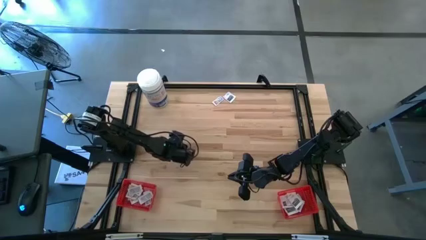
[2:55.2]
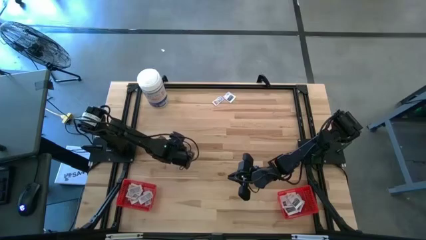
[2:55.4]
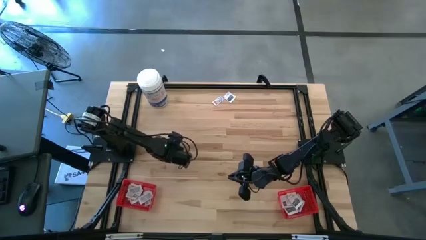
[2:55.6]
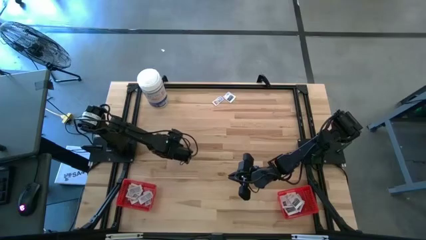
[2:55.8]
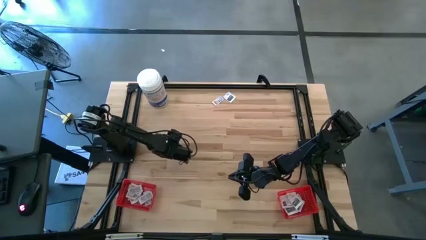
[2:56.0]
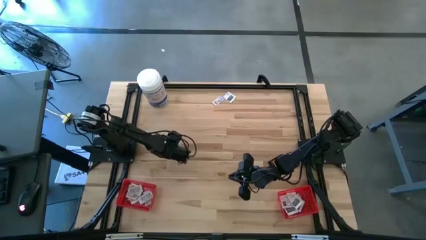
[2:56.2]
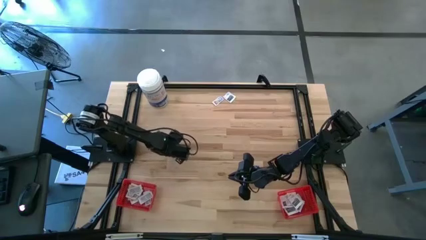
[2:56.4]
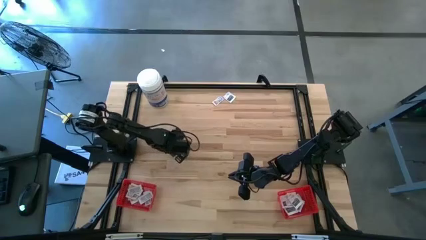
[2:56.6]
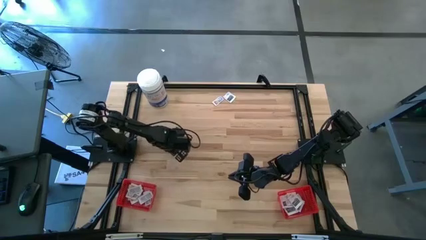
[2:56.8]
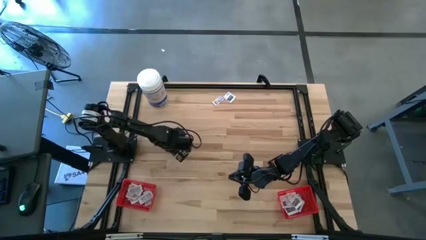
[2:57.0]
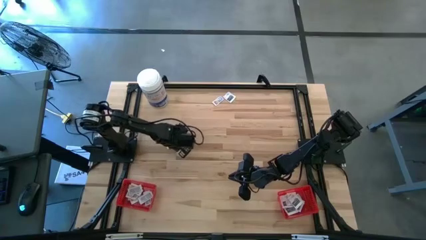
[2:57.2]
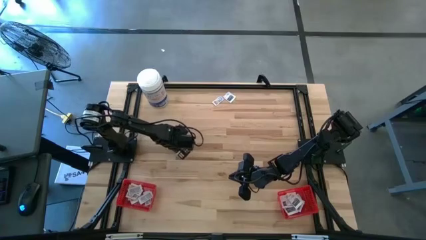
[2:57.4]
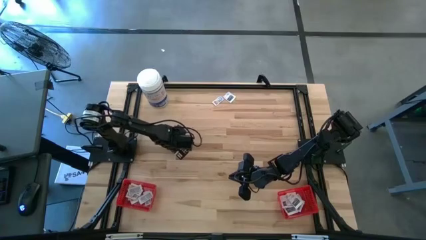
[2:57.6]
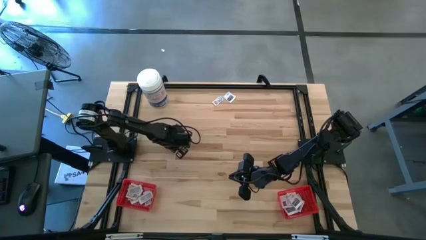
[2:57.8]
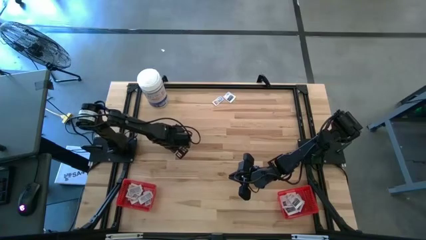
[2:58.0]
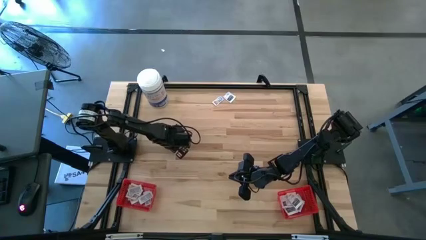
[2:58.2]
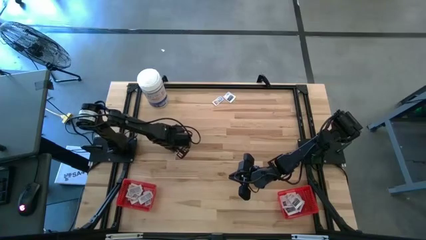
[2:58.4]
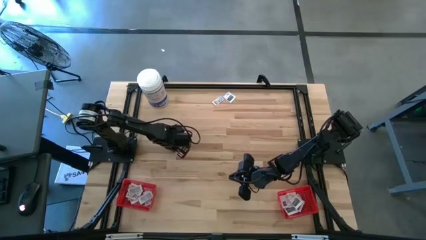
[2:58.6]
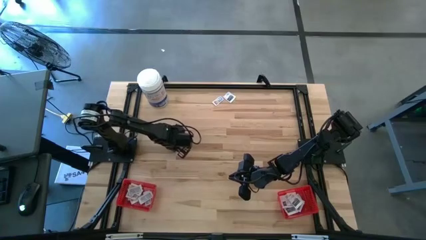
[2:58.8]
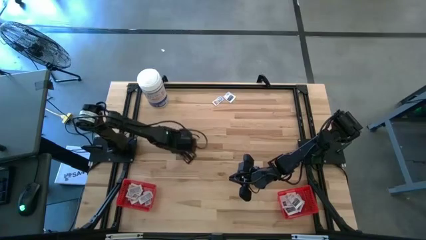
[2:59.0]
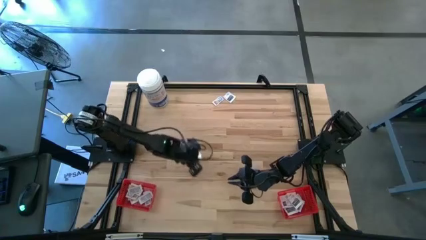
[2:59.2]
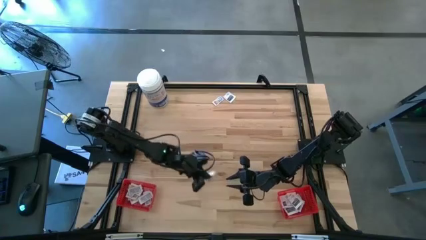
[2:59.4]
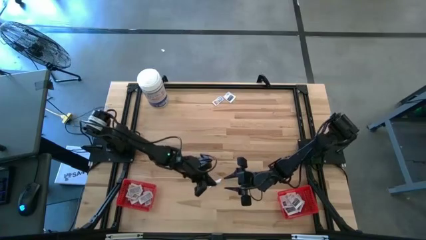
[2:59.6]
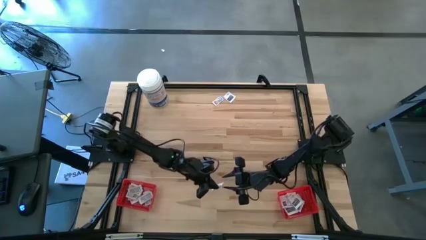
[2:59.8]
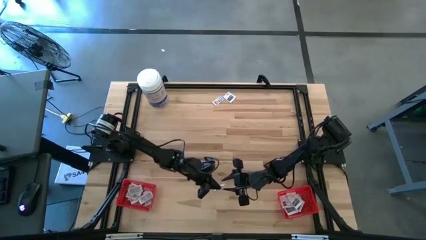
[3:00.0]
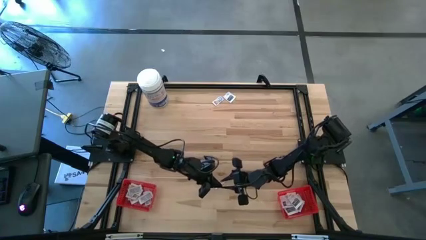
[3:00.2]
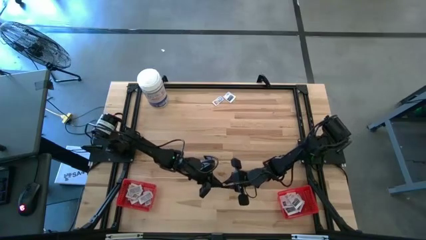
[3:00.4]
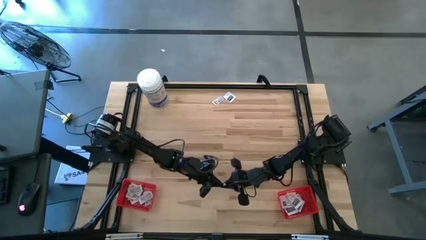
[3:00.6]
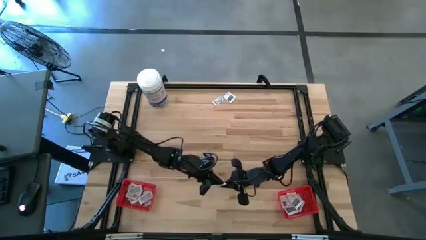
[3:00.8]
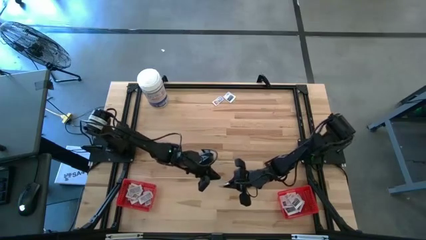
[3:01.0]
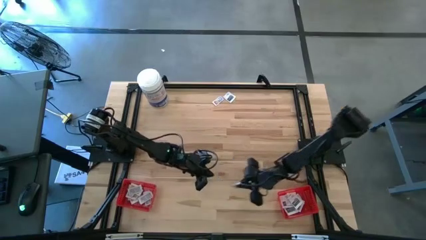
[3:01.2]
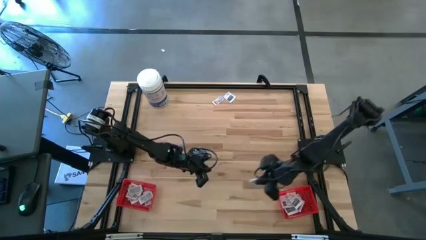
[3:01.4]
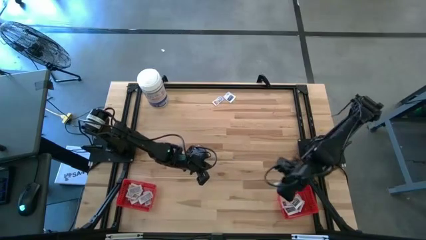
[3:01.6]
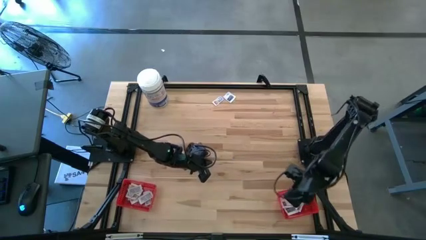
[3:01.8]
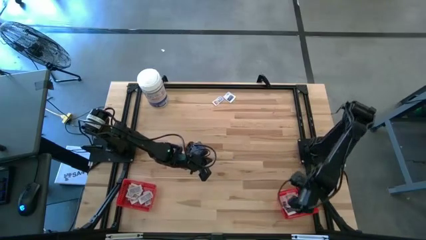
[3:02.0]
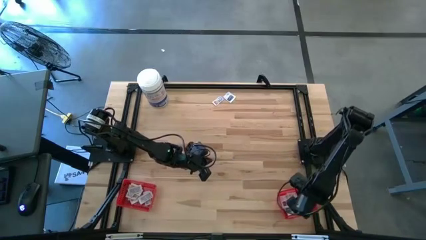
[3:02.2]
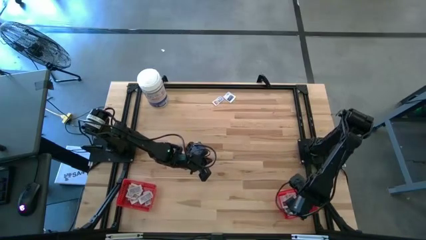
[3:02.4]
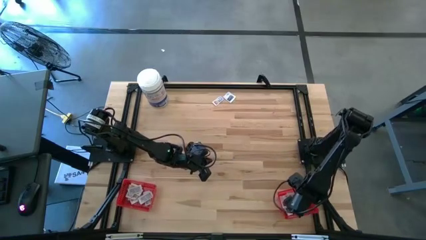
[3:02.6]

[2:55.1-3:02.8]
Task: Pick & Place First Aid Supplies
Put the towelette pack into the right red bin

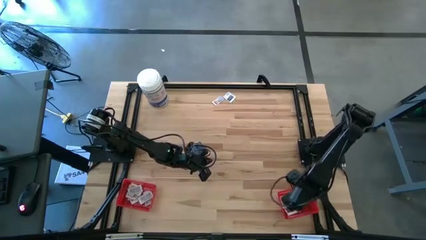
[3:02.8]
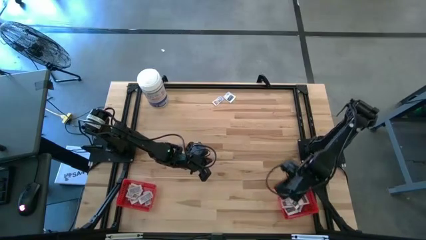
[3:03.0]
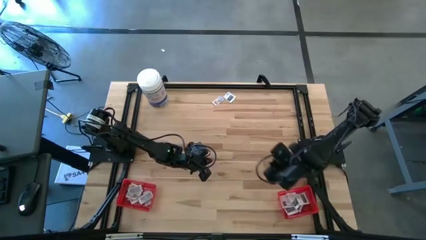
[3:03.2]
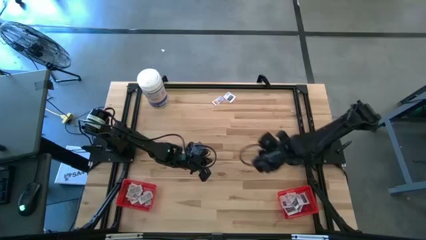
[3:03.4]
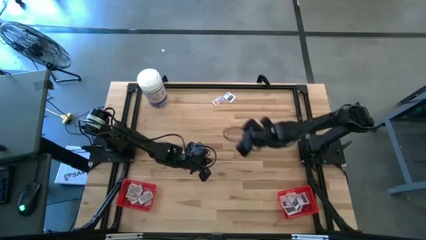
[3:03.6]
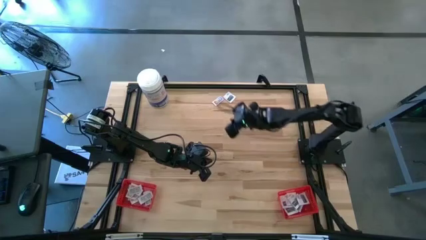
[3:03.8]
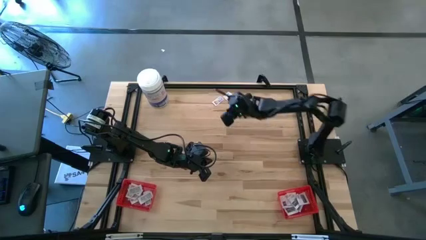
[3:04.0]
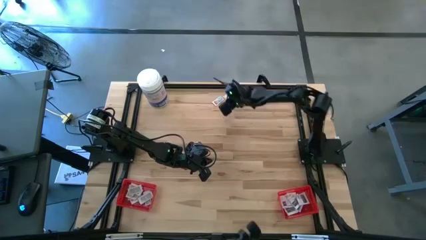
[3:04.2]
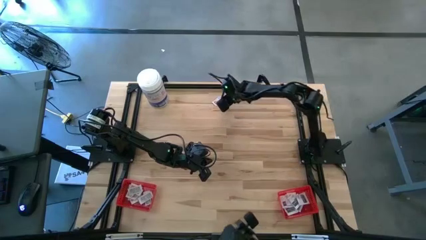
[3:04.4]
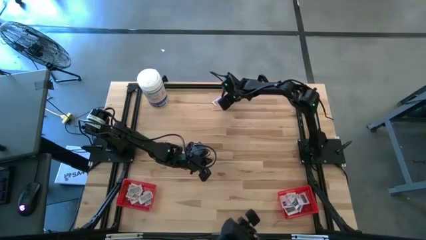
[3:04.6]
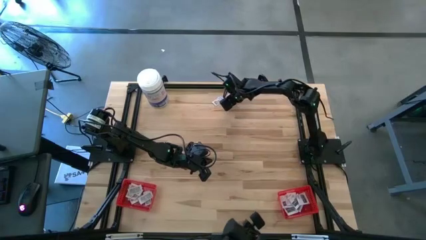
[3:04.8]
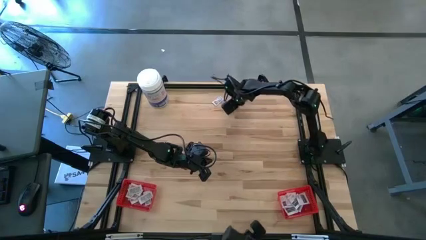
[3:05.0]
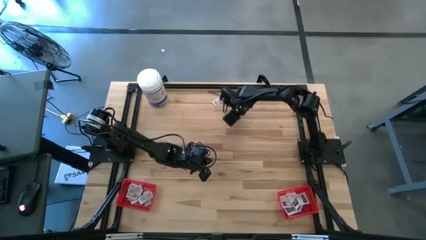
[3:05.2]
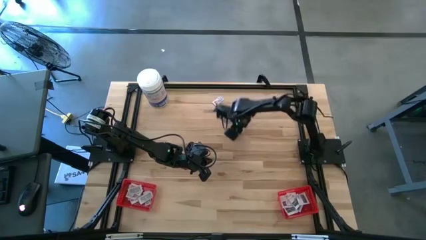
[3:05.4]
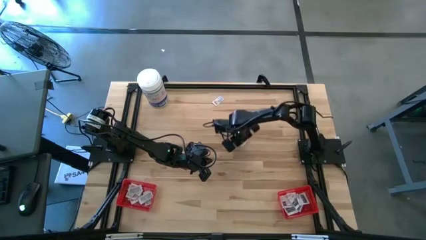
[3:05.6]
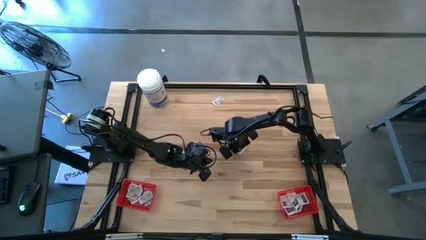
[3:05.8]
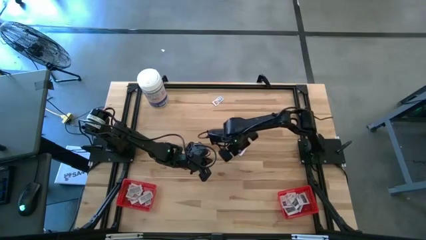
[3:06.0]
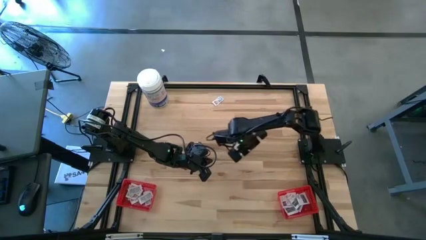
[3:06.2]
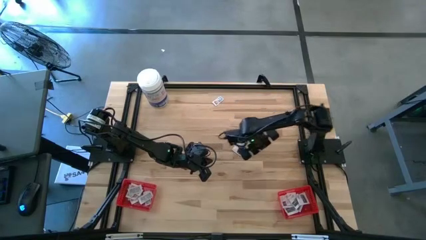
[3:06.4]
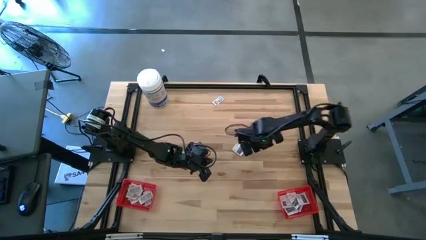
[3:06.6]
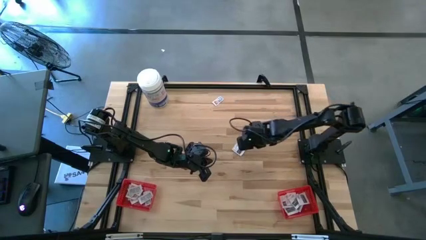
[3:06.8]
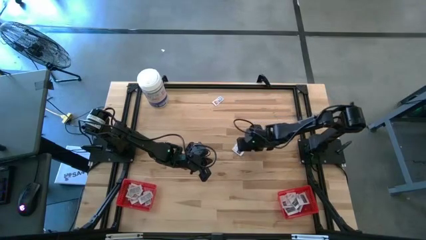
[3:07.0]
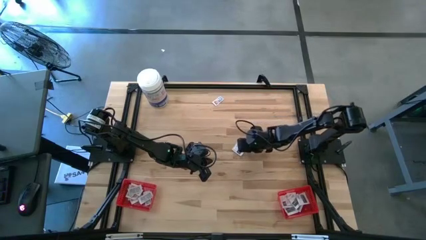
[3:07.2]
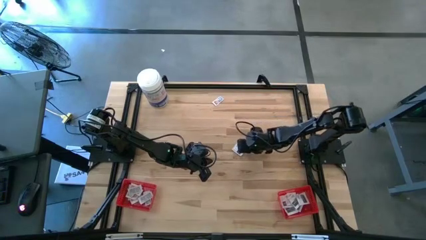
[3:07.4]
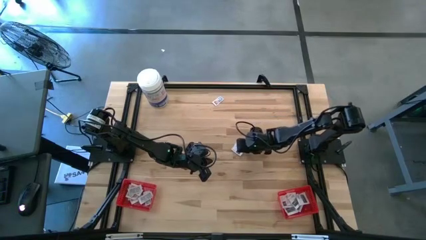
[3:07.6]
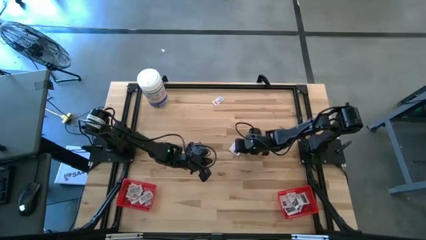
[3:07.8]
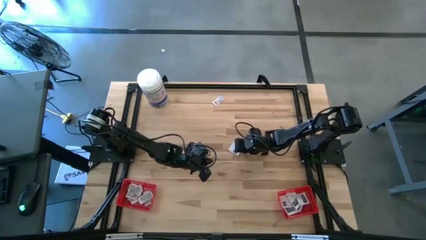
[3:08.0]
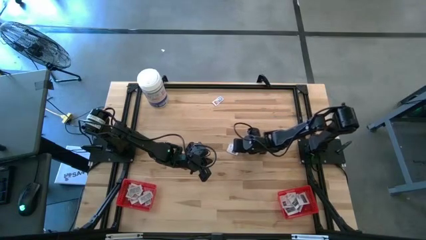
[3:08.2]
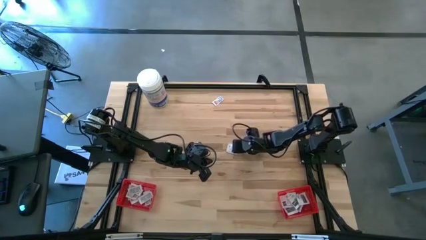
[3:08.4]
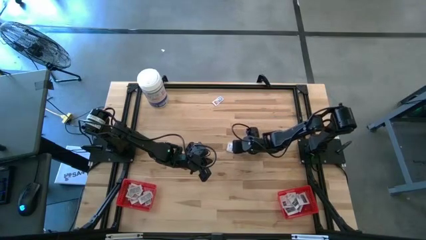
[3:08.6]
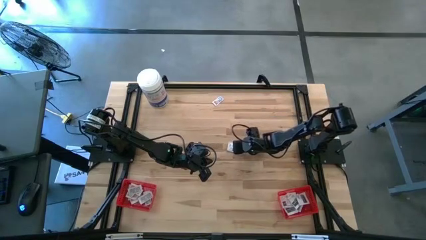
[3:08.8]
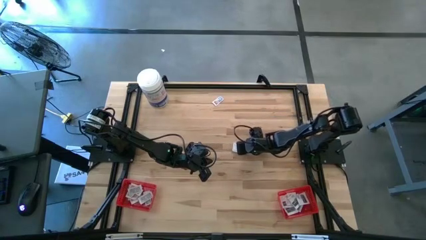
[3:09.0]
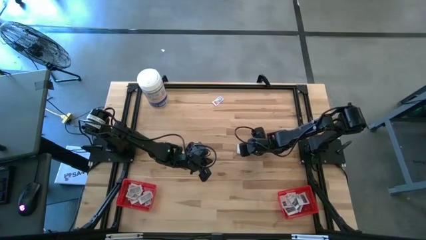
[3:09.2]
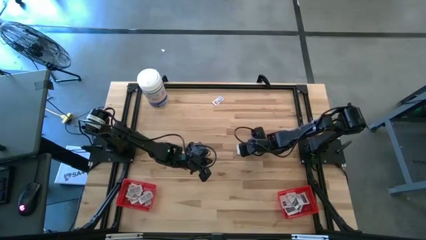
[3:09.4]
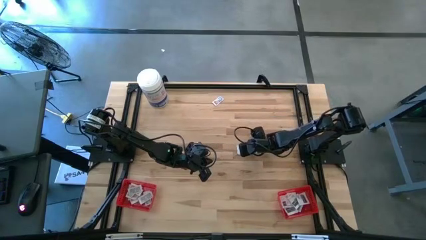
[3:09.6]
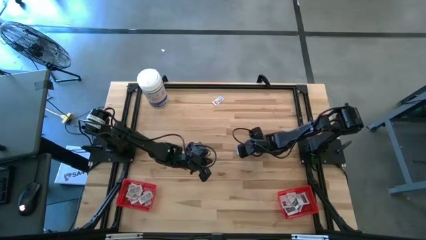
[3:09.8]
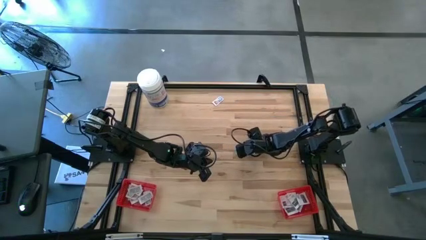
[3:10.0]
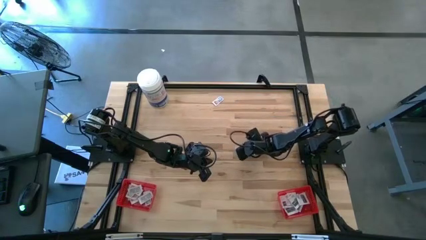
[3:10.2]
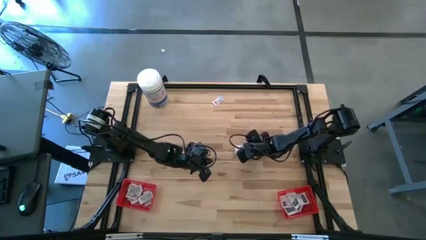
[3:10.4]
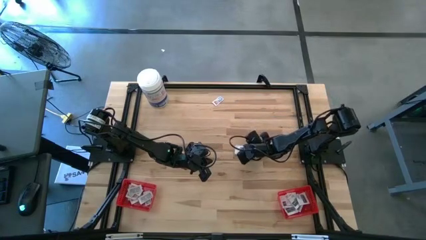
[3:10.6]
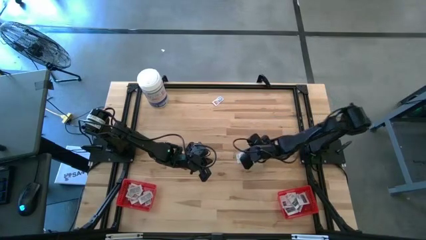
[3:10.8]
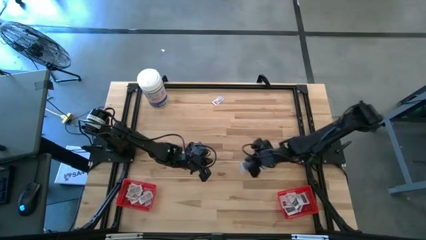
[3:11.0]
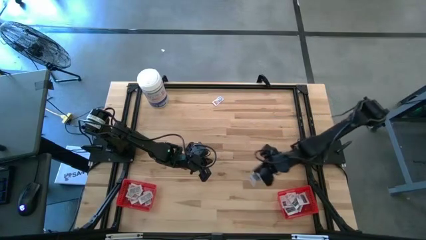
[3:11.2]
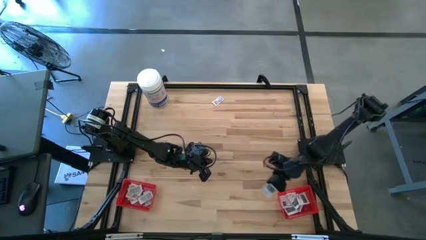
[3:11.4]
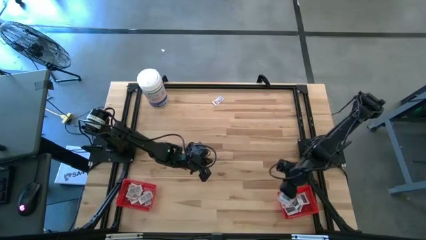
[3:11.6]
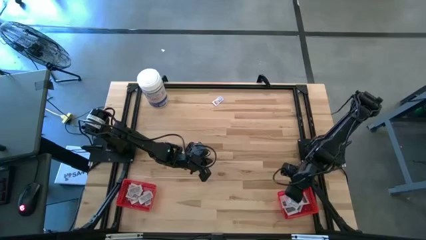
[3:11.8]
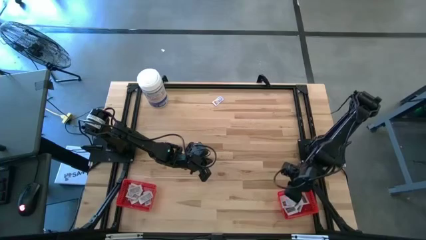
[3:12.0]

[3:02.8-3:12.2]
Put the towelette pack into the right red bin
